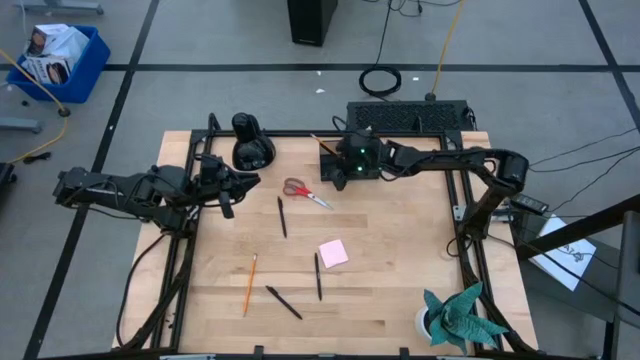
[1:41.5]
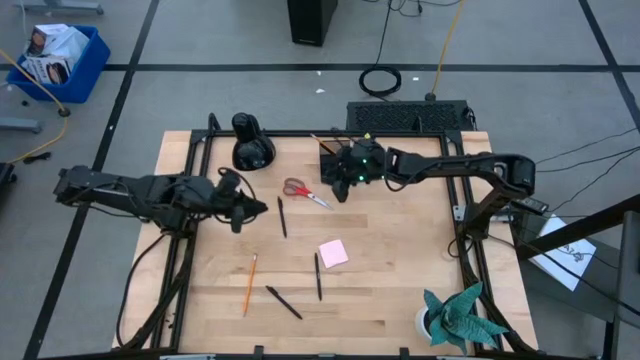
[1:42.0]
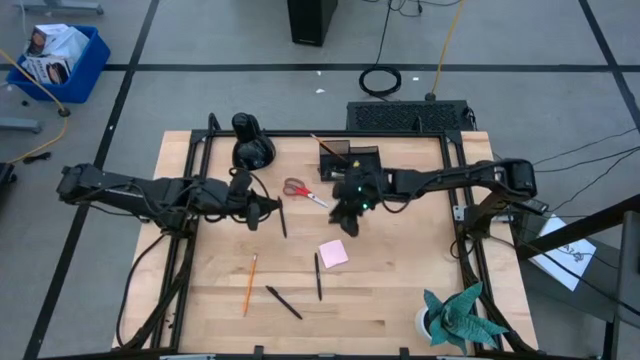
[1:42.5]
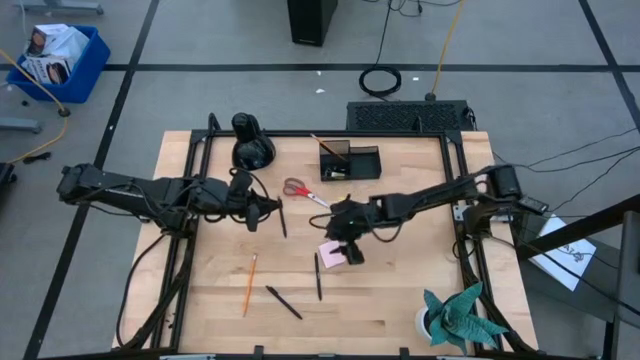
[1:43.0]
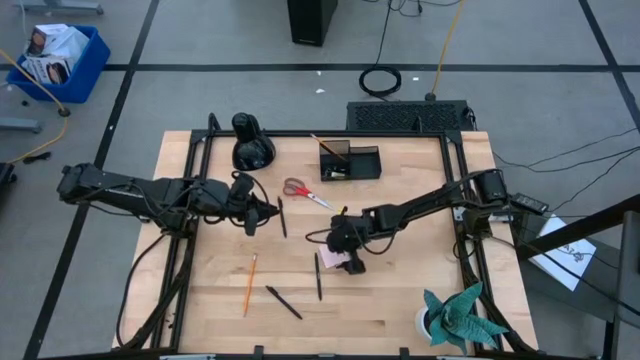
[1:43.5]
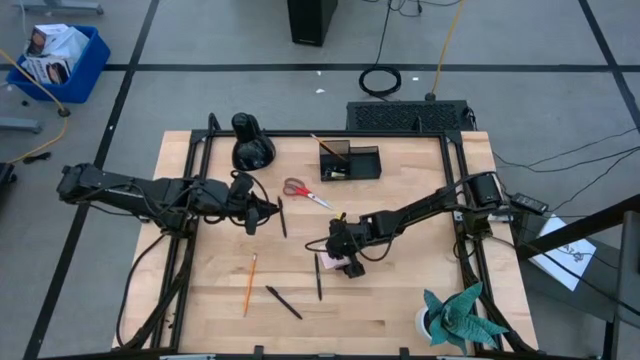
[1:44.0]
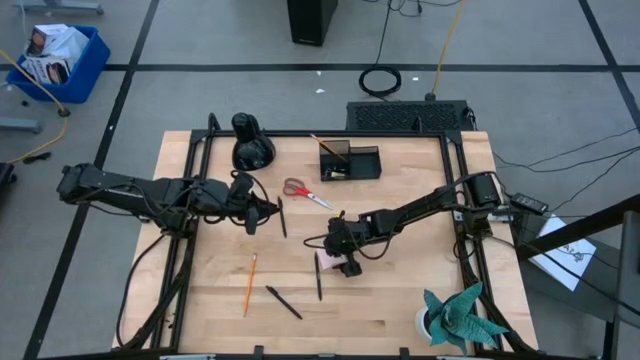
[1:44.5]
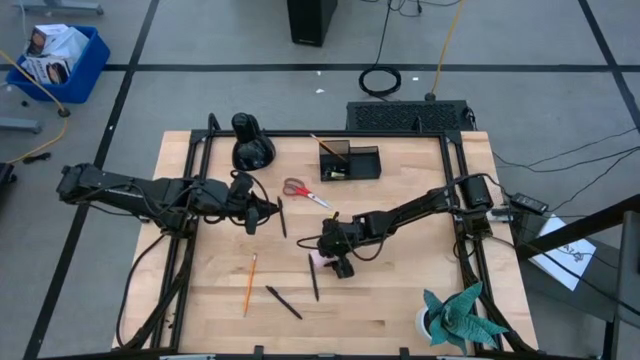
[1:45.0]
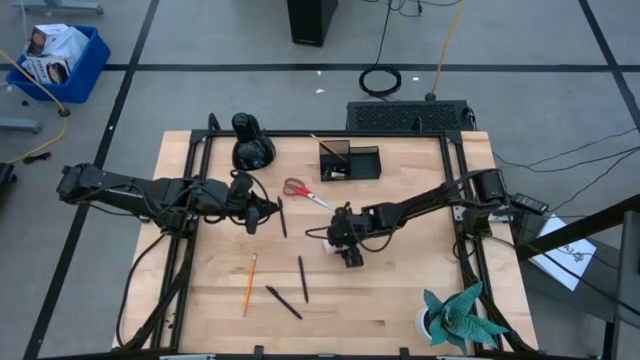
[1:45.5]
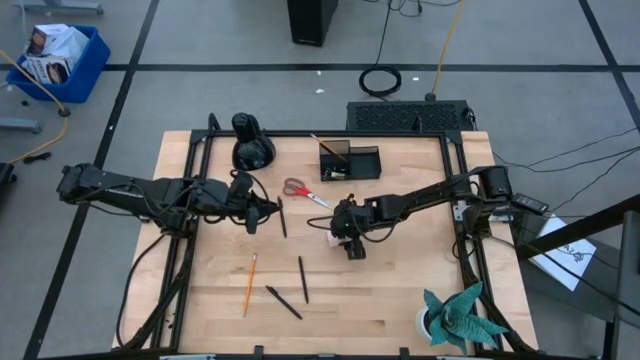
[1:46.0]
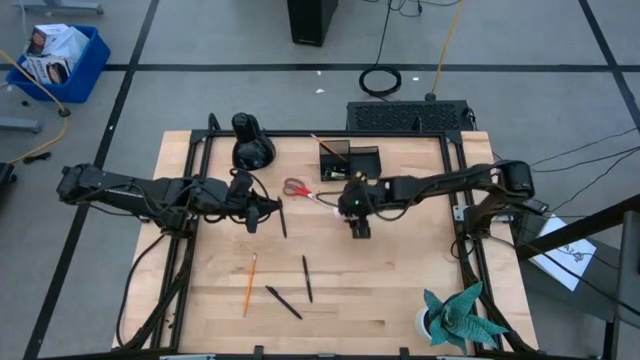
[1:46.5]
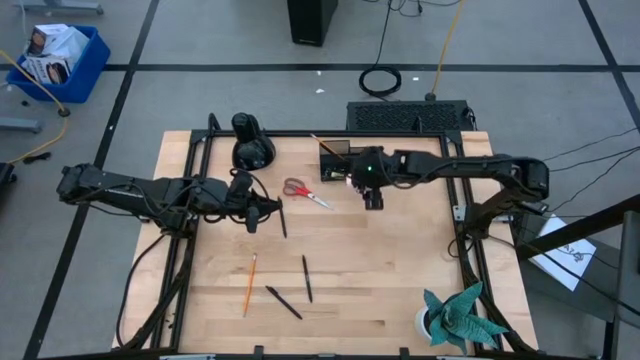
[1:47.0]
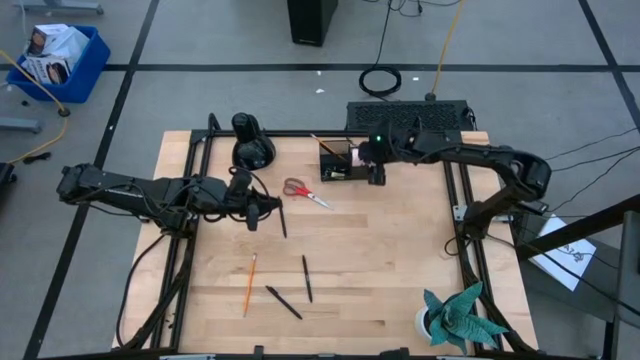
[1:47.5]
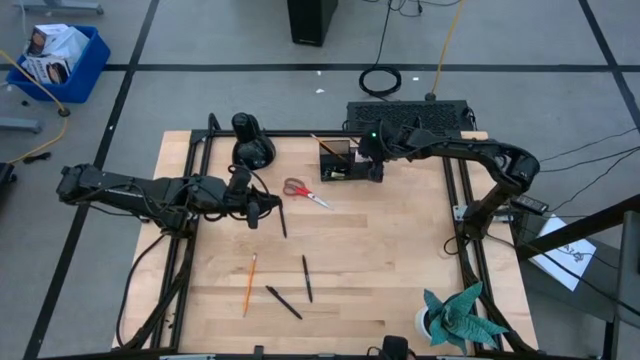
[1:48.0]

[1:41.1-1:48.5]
Task: Pick and place office supplies into organizer
Put the pink sticky notes into the black desk organizer

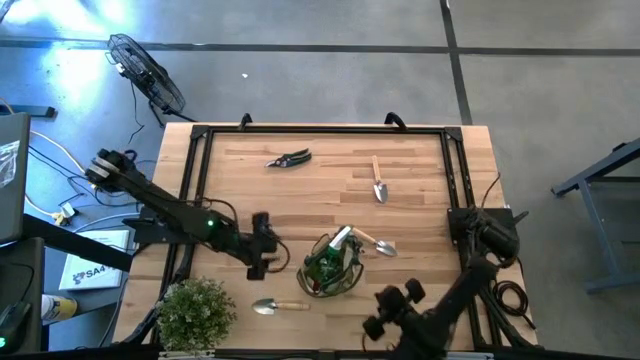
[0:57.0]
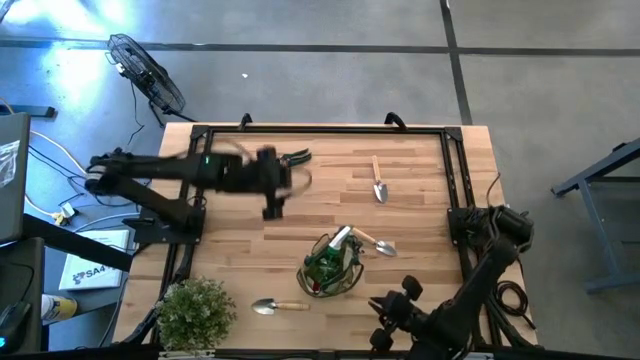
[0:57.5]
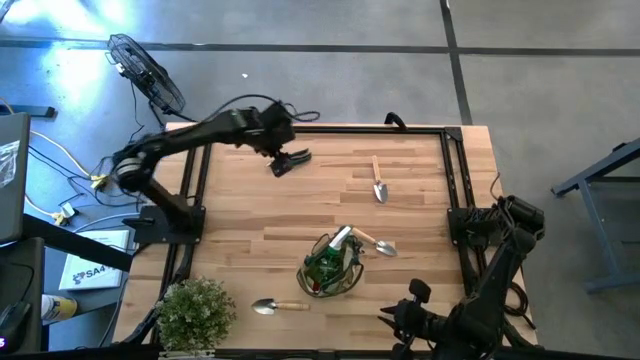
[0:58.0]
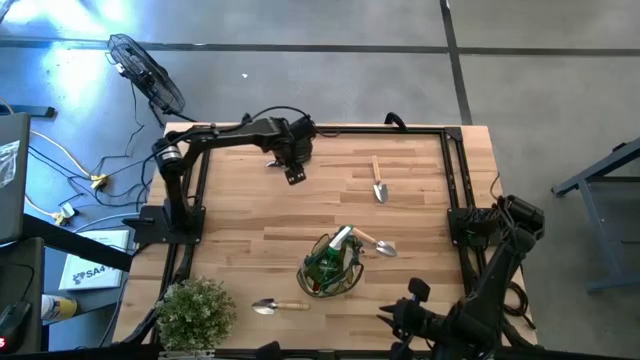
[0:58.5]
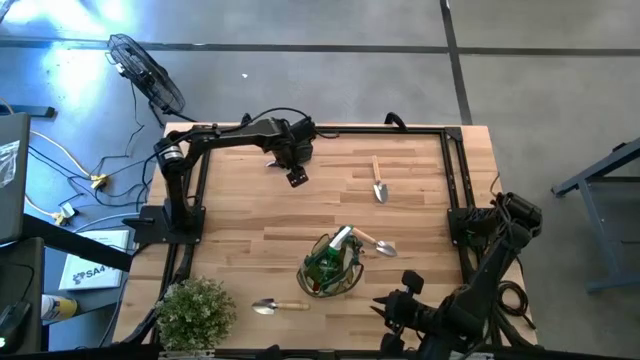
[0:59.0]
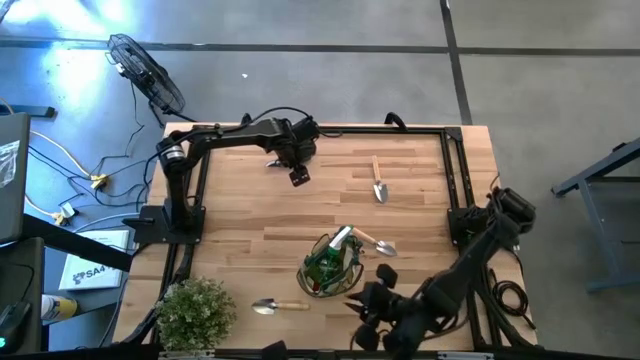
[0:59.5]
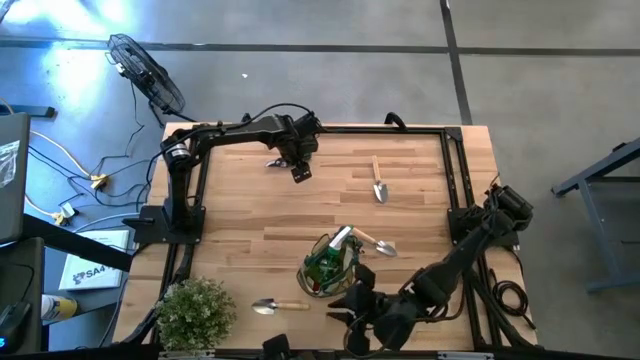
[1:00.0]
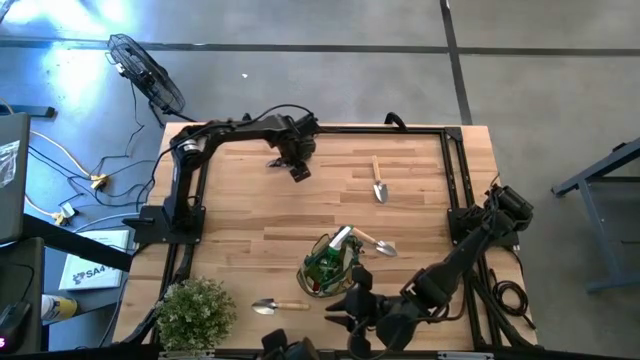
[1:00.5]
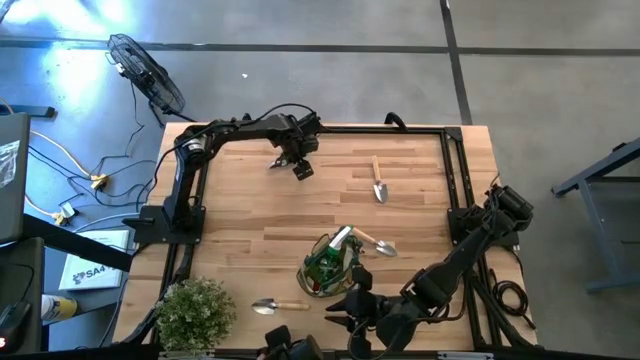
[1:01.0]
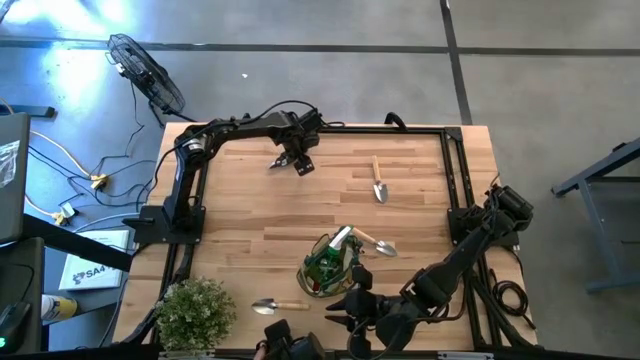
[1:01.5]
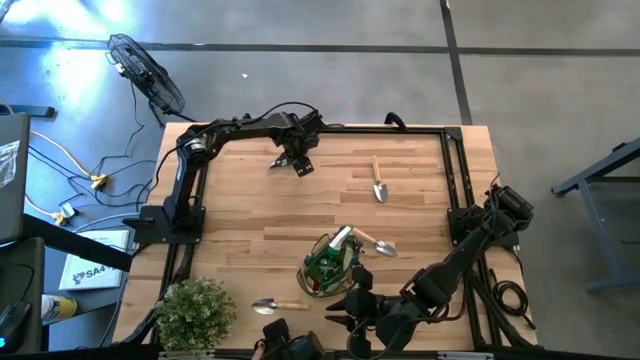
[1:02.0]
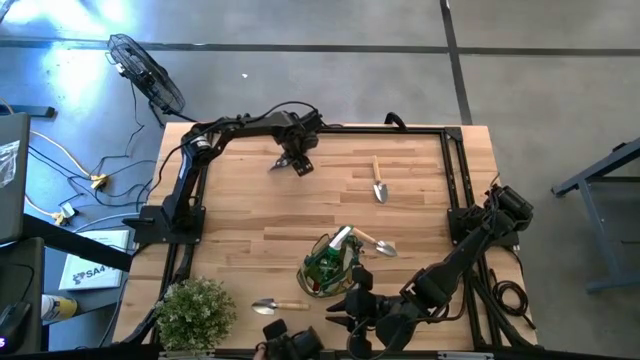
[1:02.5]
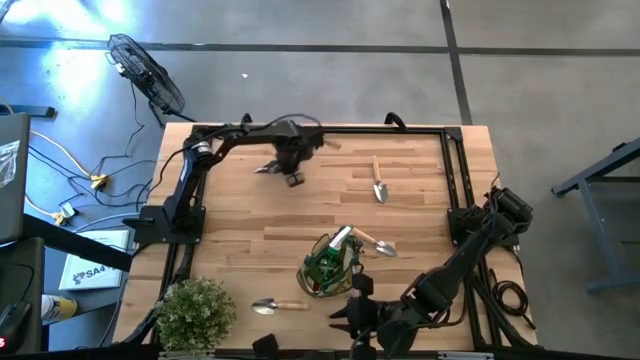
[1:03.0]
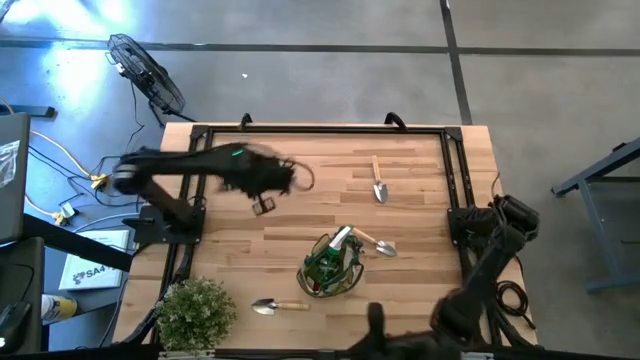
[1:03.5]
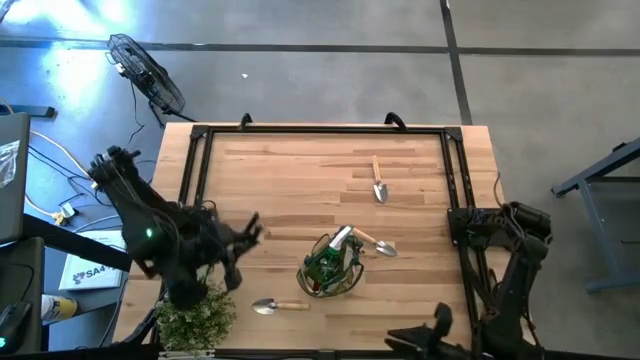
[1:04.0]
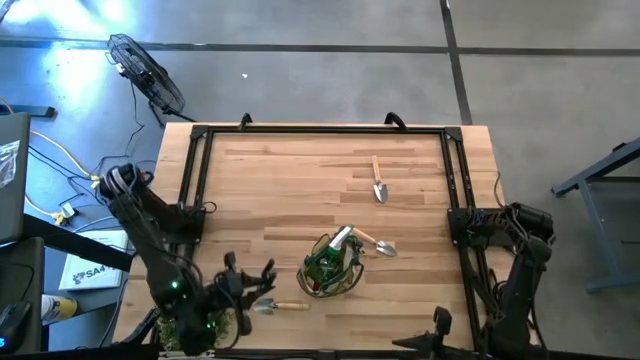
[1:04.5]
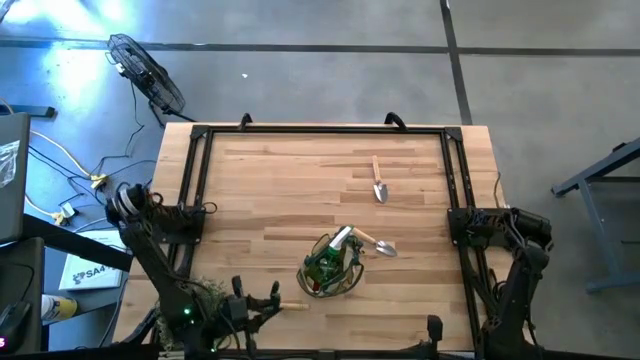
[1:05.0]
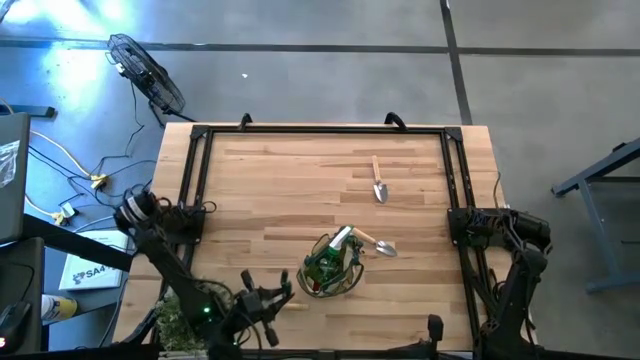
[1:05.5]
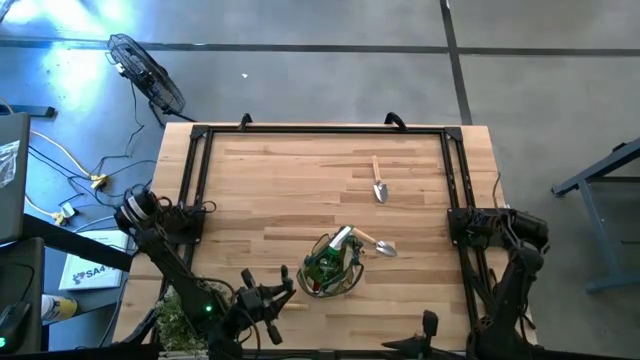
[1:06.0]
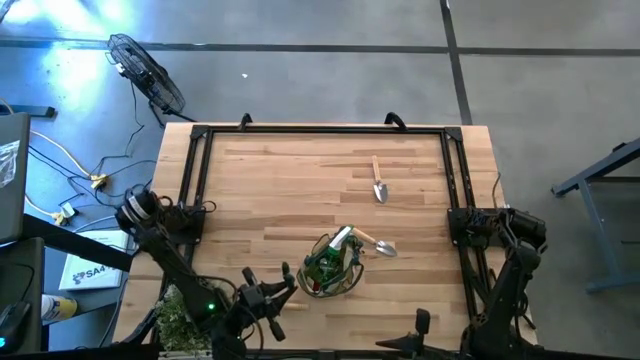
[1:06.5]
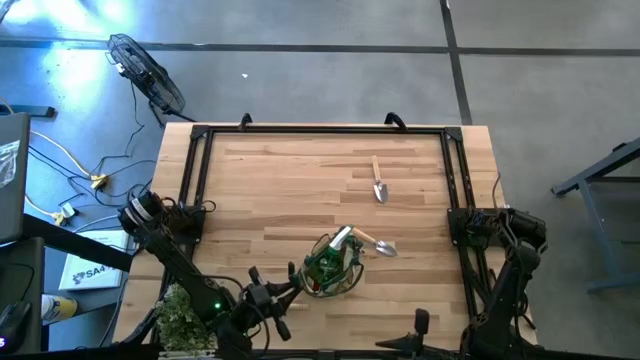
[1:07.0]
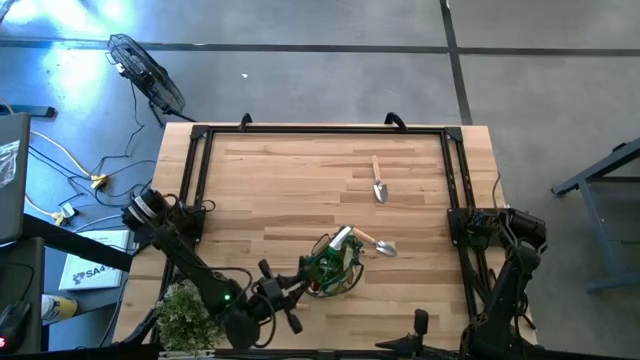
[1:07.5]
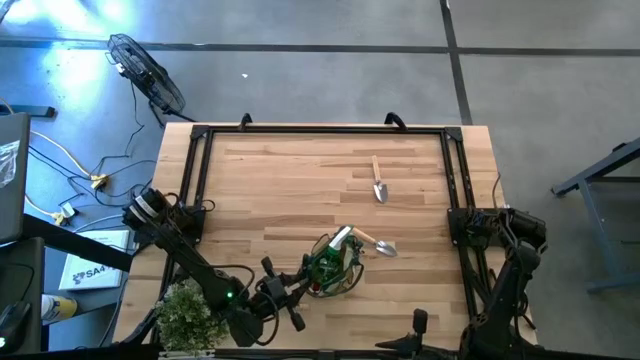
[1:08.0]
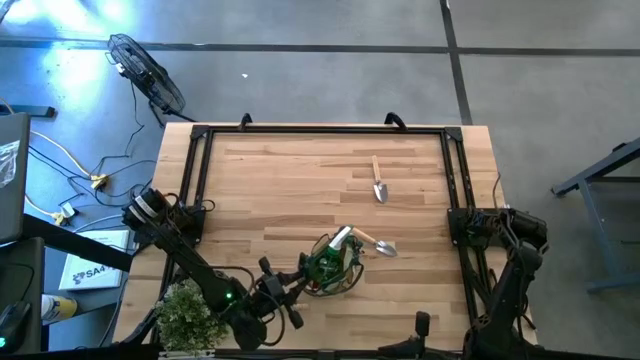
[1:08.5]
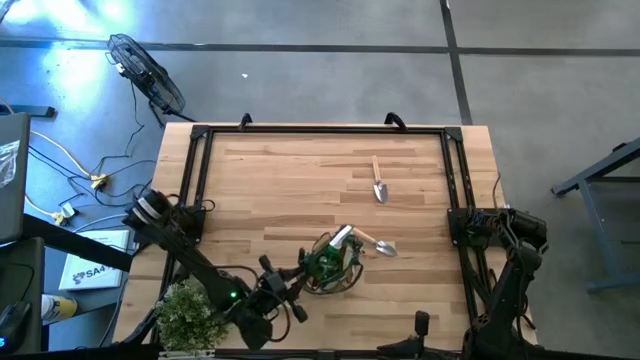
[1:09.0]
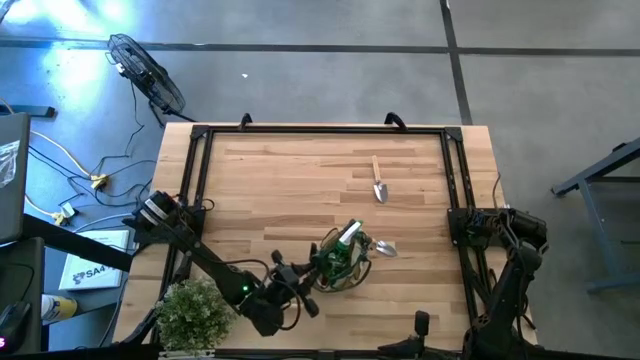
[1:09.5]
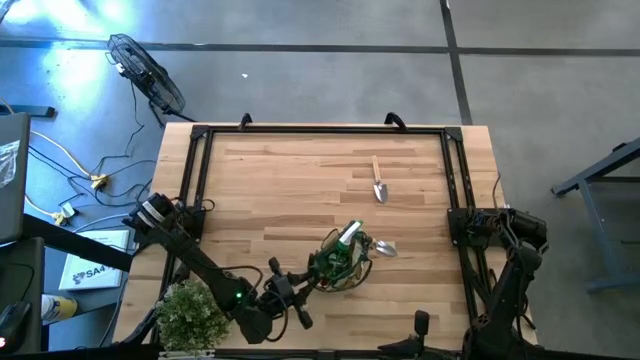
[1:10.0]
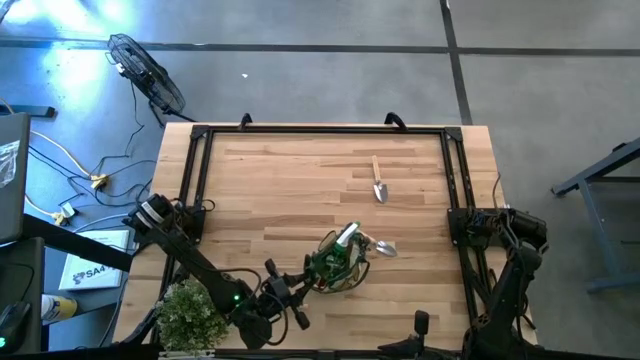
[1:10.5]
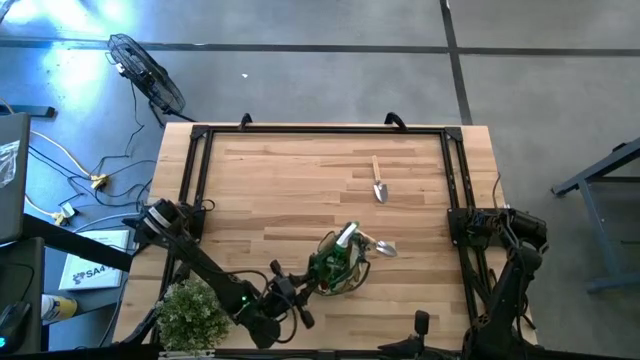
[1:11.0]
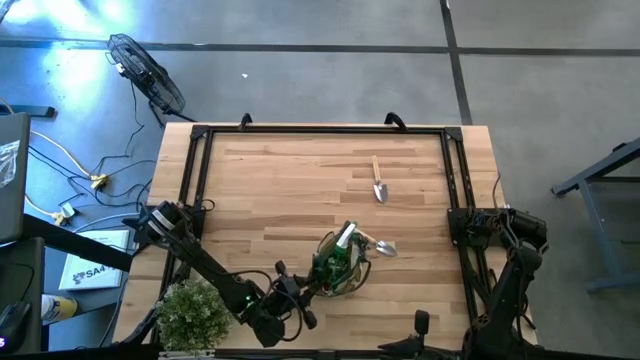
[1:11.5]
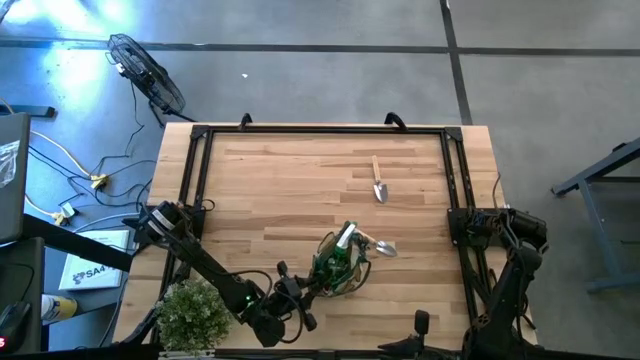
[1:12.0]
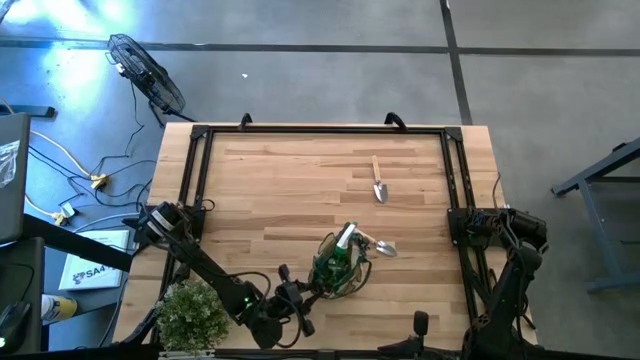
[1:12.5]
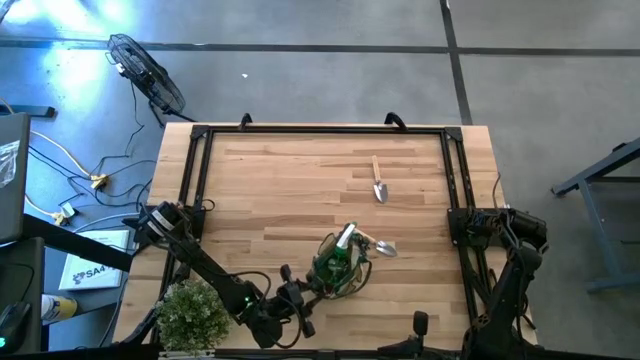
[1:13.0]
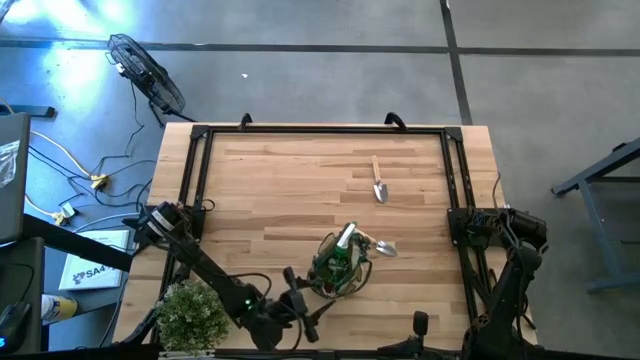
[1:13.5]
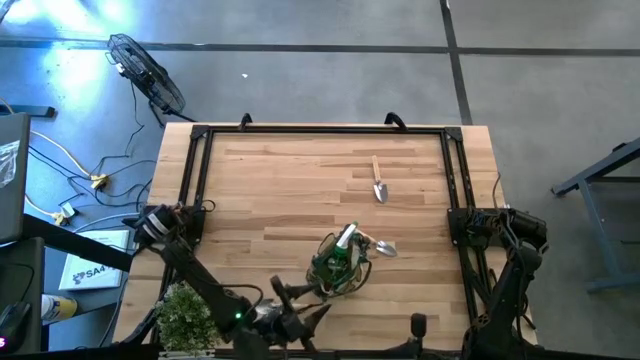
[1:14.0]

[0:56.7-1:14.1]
Task: Pick & Place Garden tools in Gardening bag
Put the shear scissors into the gardening bag
